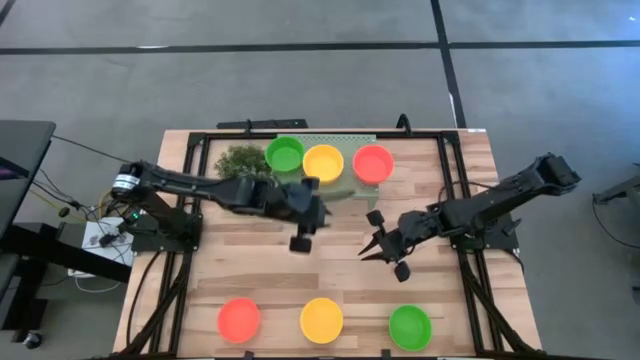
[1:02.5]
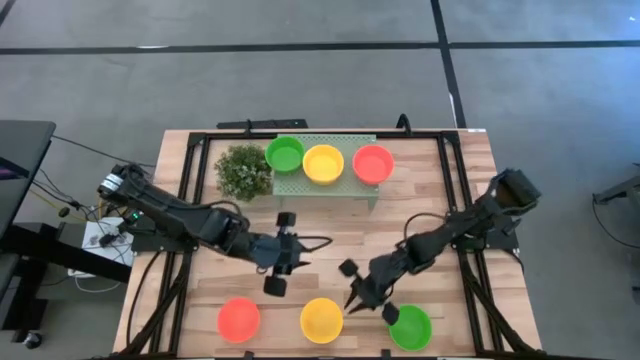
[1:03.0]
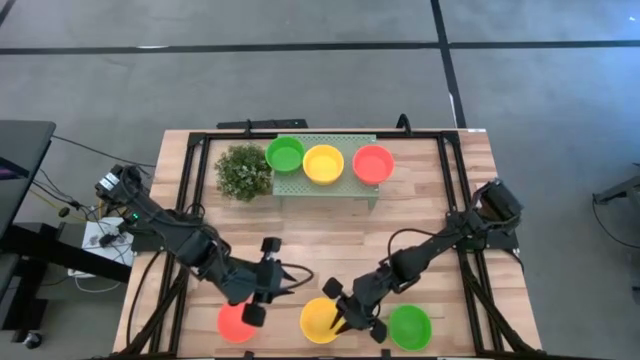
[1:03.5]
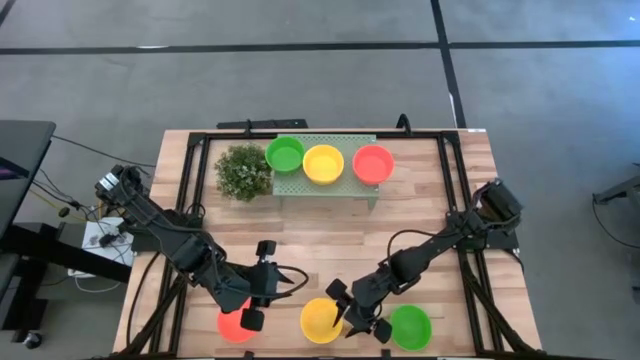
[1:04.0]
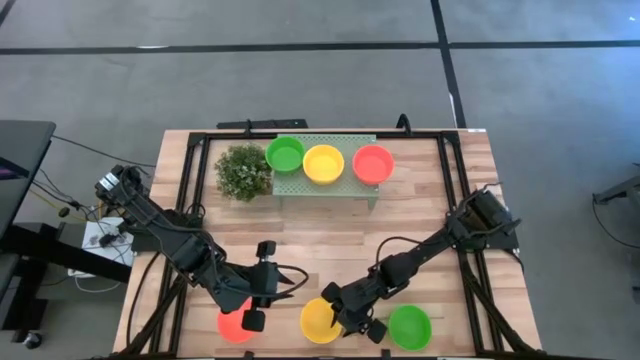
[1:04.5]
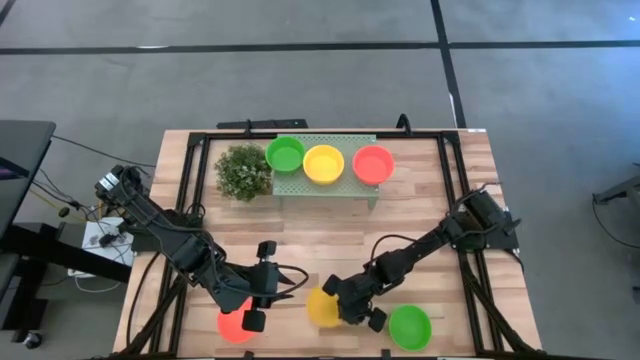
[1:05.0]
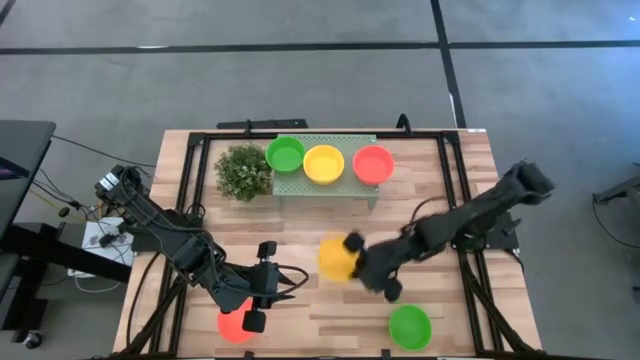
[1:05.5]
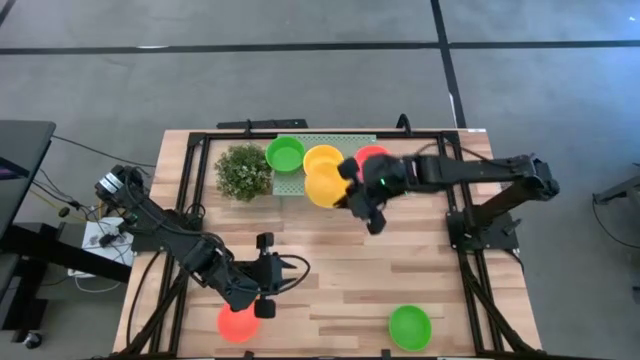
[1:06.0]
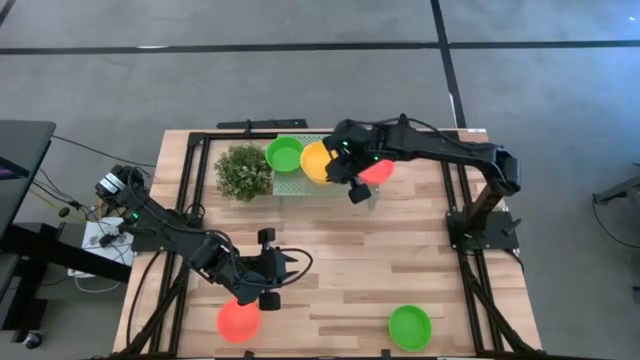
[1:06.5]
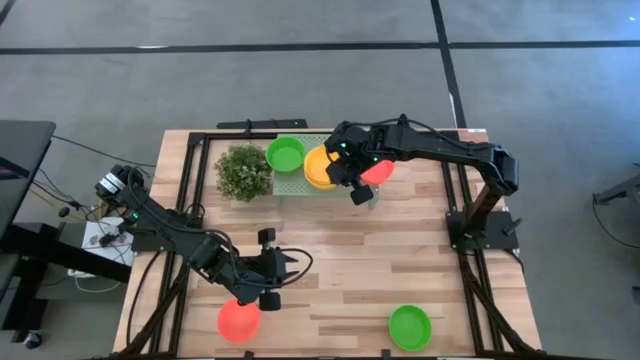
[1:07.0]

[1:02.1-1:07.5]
Task: Pick & Place Mini bowls
Stack the yellow bowl on the yellow bowl on the shelf

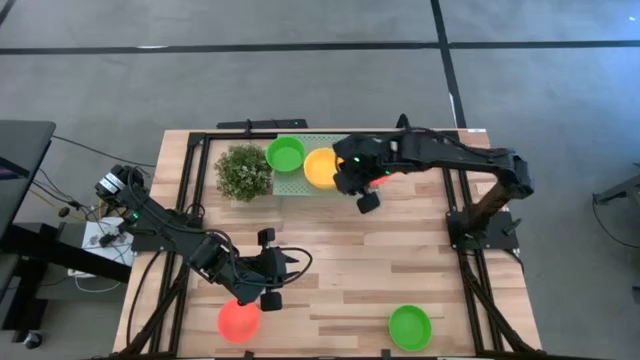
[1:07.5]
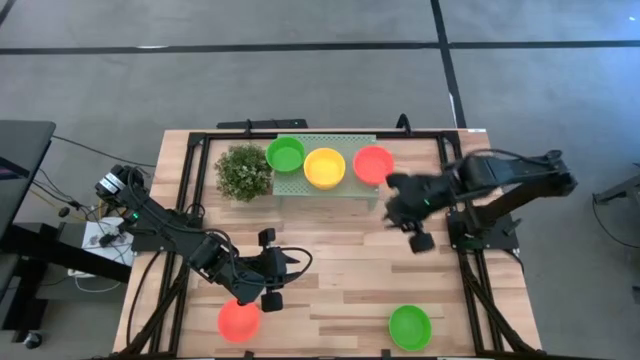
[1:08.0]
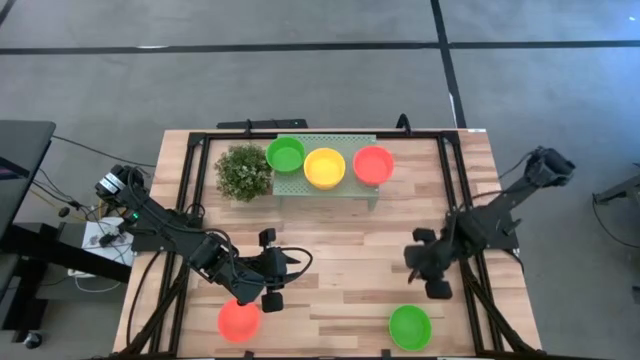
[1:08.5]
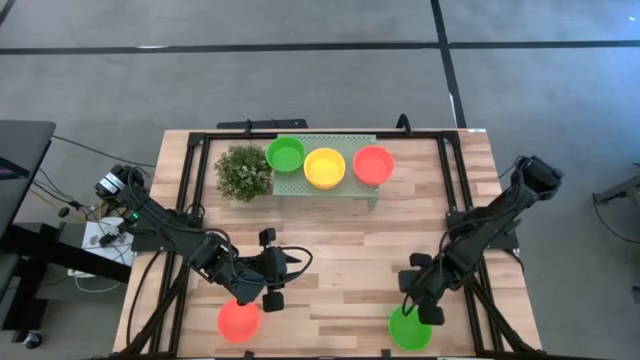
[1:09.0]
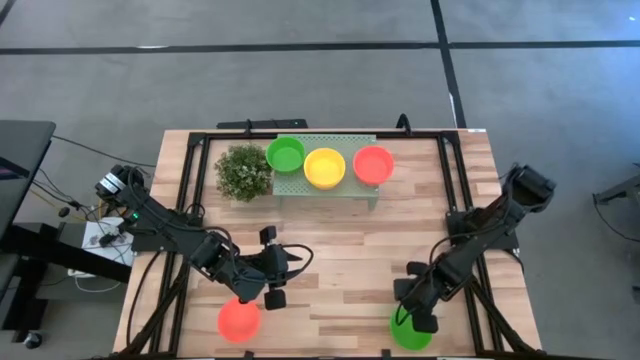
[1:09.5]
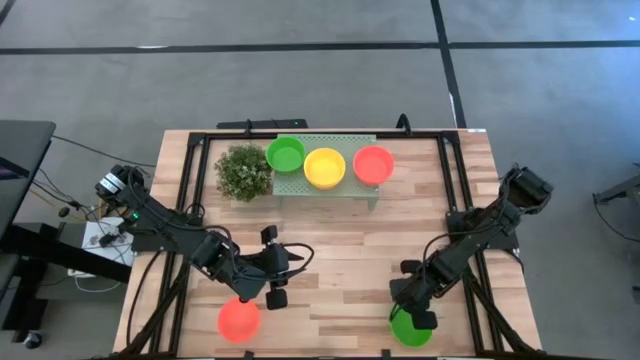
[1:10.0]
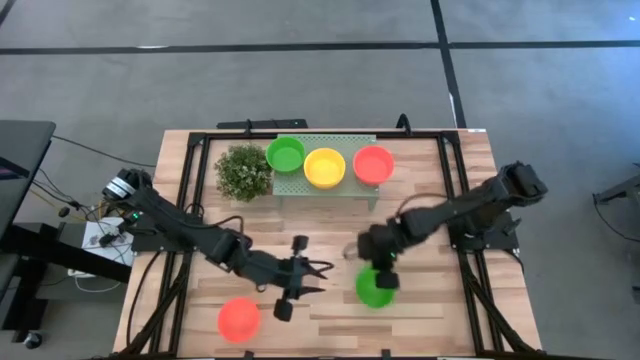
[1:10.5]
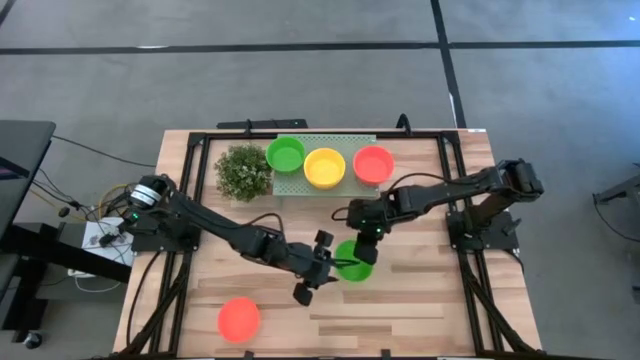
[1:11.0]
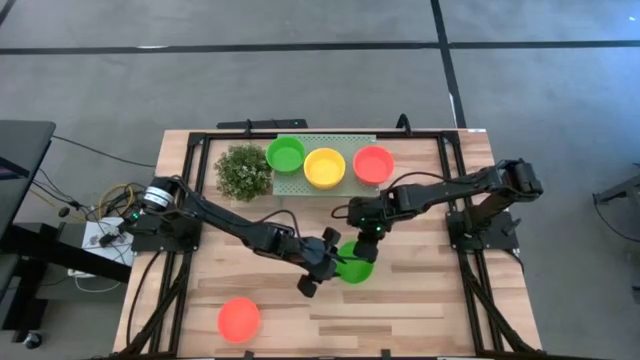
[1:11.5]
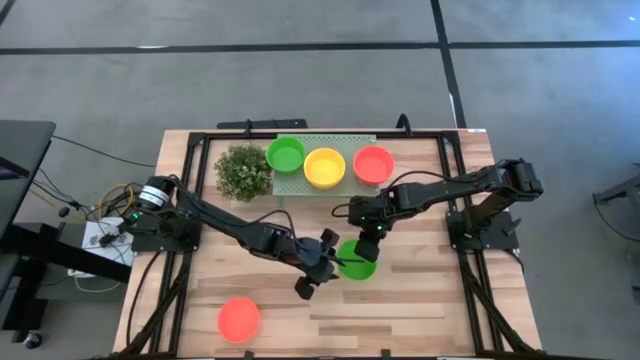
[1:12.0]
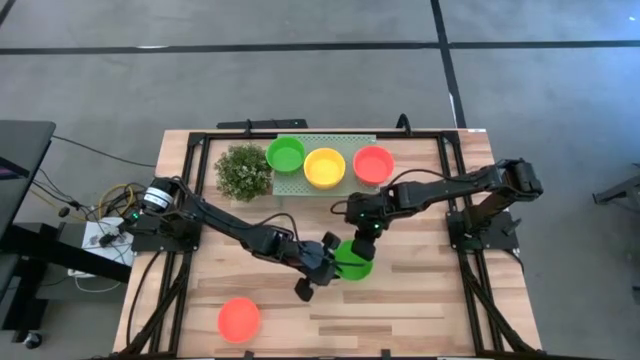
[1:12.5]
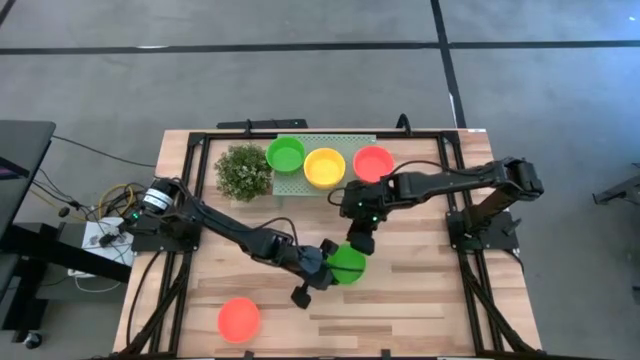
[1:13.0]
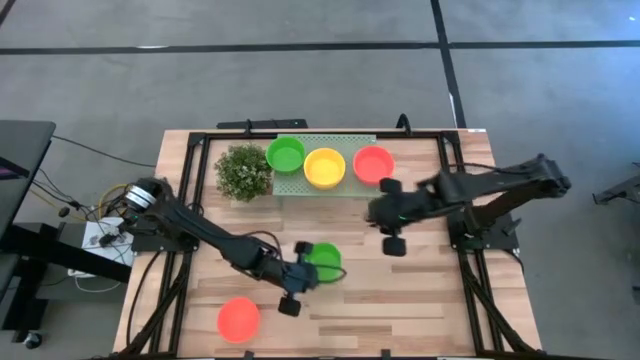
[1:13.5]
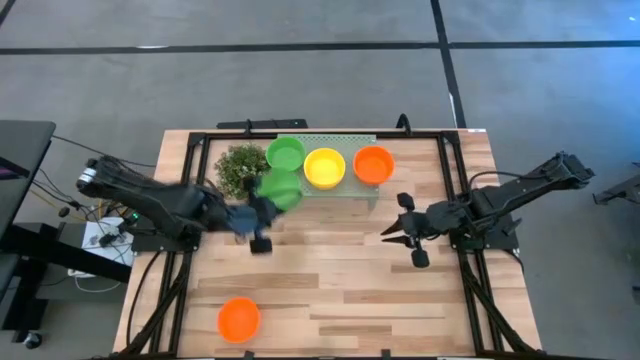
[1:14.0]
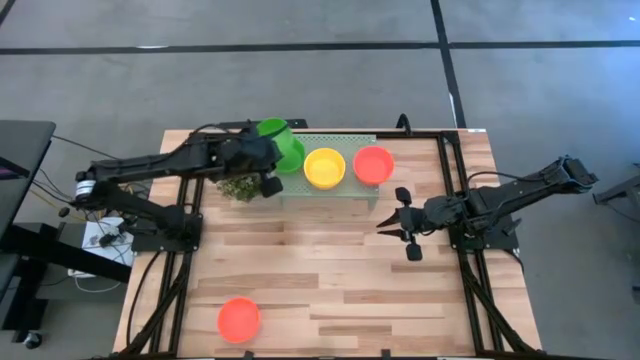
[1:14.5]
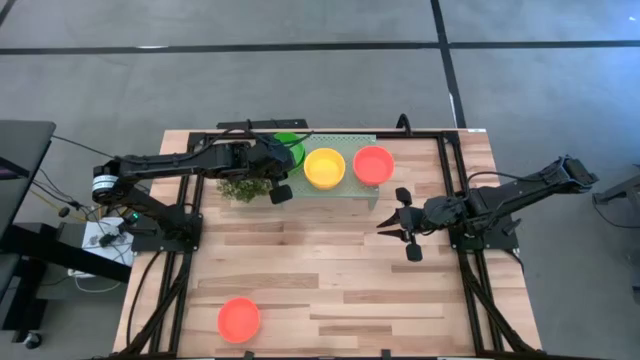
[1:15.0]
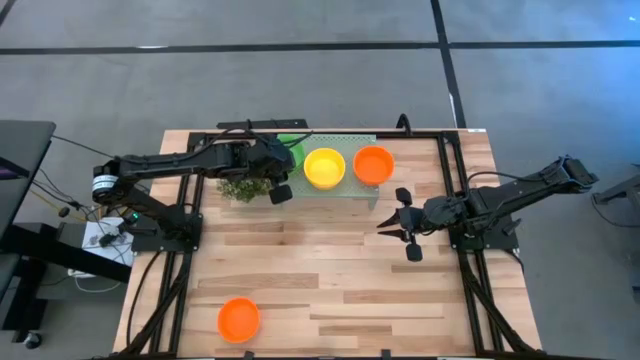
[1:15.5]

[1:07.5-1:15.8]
Stack the green bowl on the green bowl on the shelf

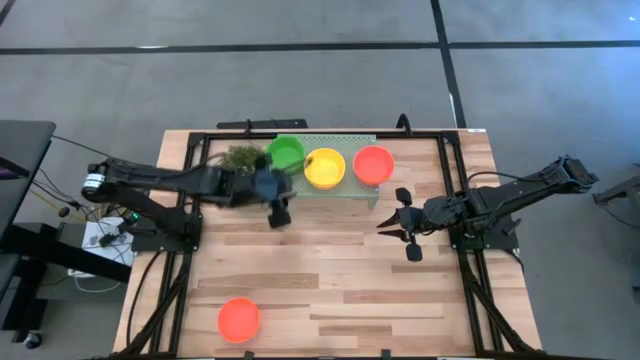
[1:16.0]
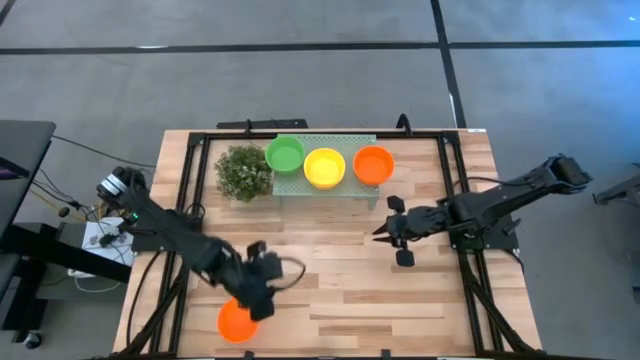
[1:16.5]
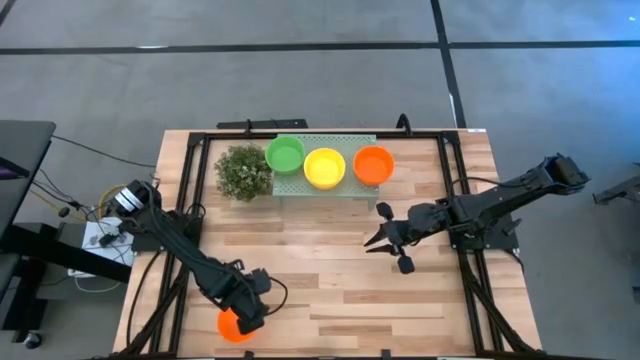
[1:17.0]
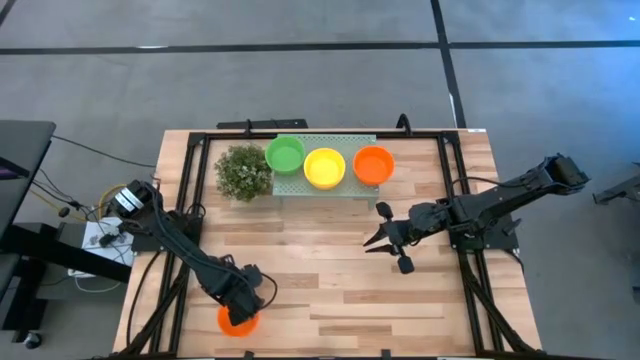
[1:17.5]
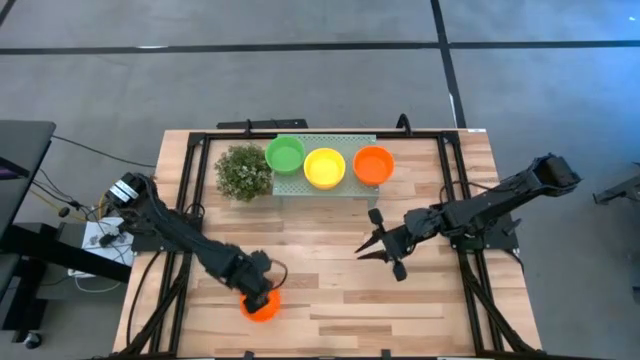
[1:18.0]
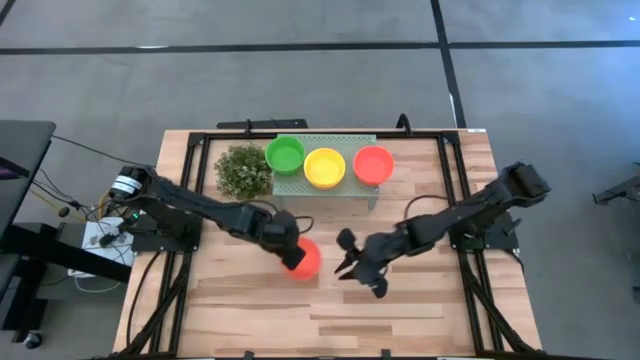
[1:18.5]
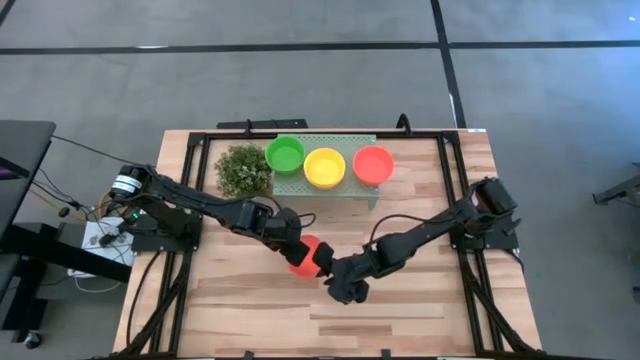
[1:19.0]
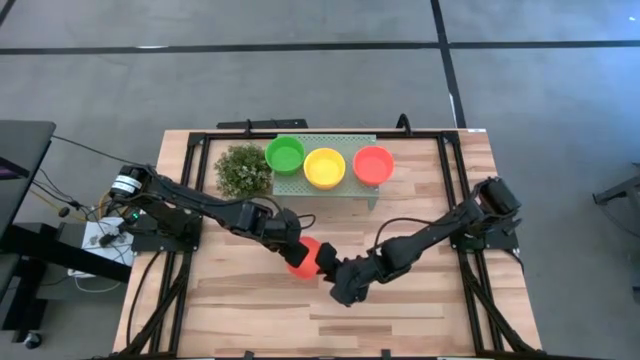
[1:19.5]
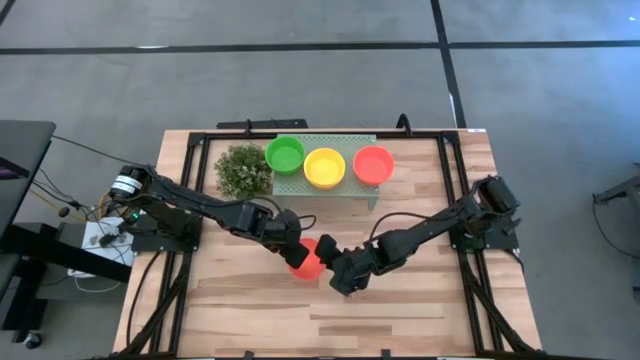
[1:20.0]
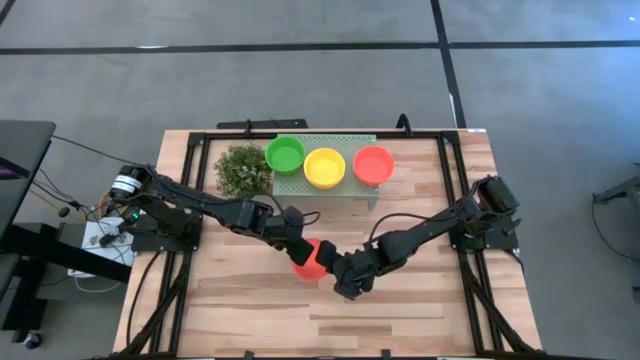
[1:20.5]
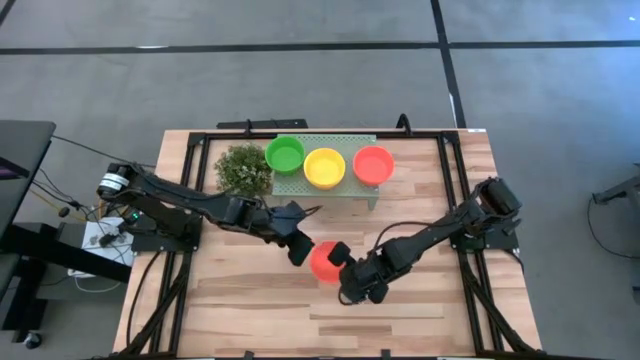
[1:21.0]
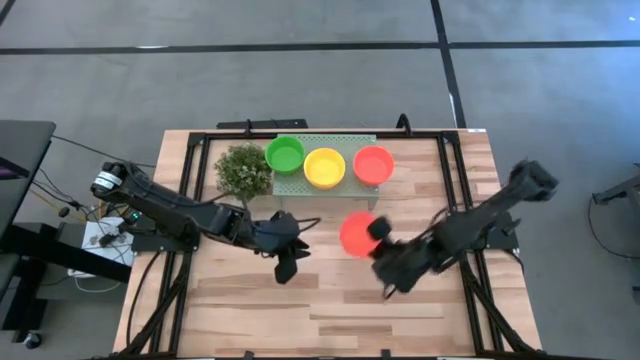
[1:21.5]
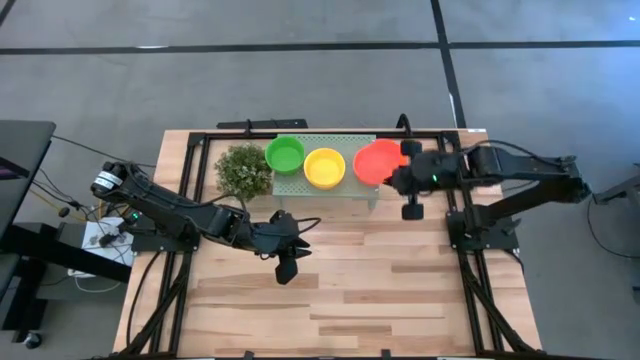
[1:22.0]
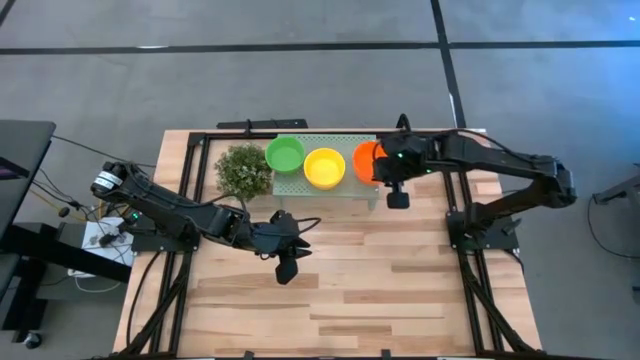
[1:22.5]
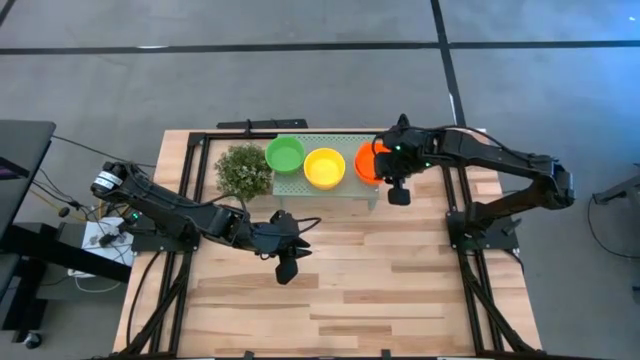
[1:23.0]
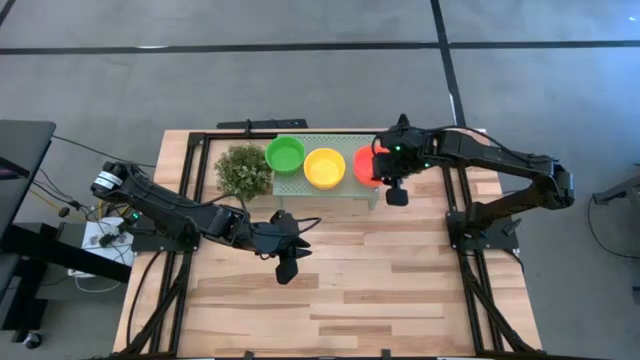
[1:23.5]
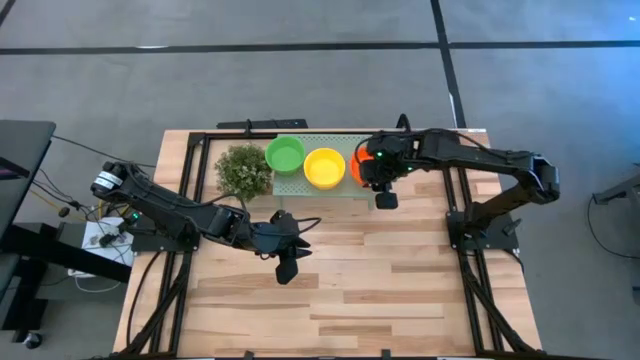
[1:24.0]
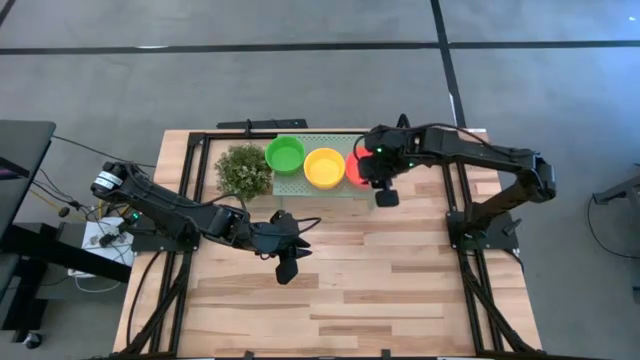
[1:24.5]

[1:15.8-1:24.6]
Stack the orange bowl on the orange bowl on the shelf
